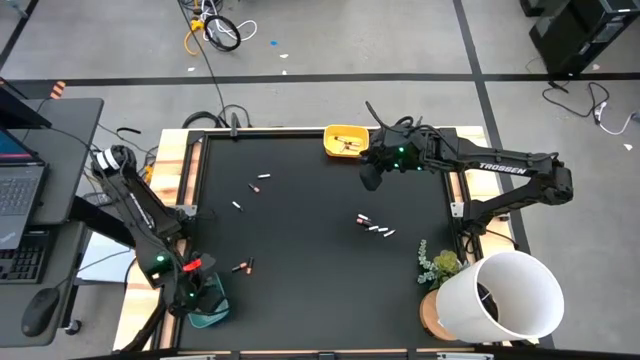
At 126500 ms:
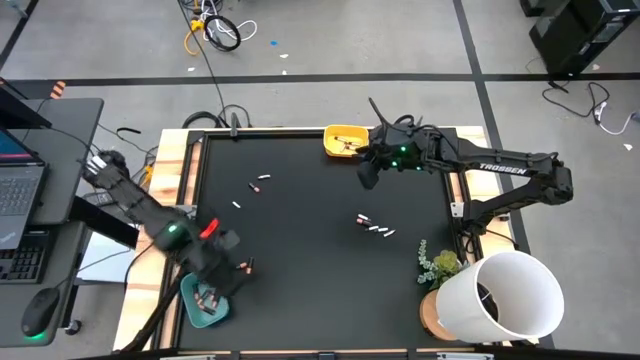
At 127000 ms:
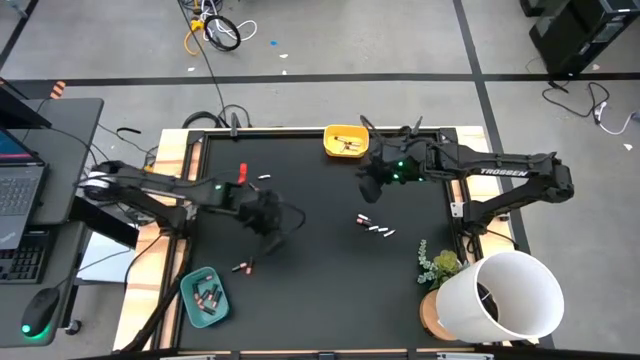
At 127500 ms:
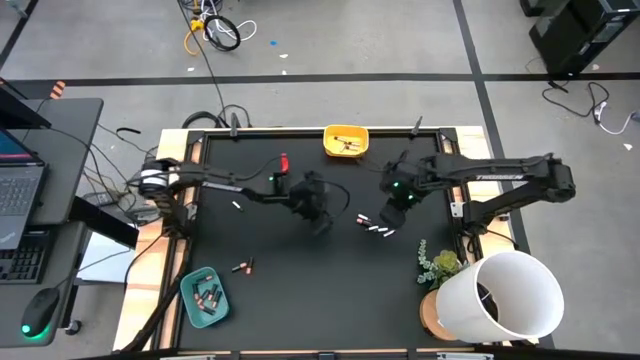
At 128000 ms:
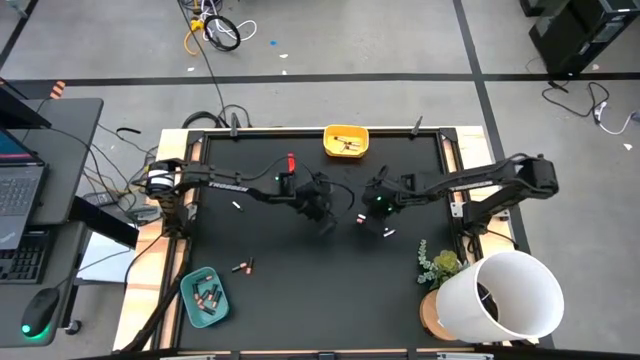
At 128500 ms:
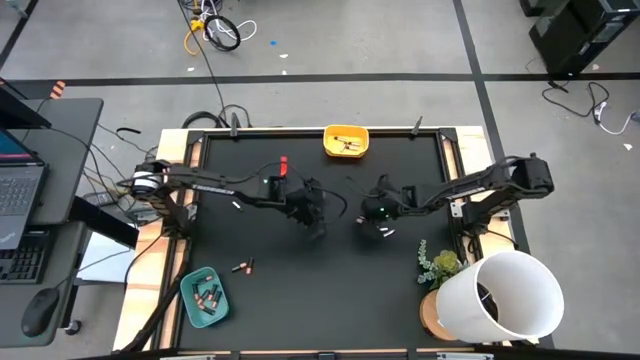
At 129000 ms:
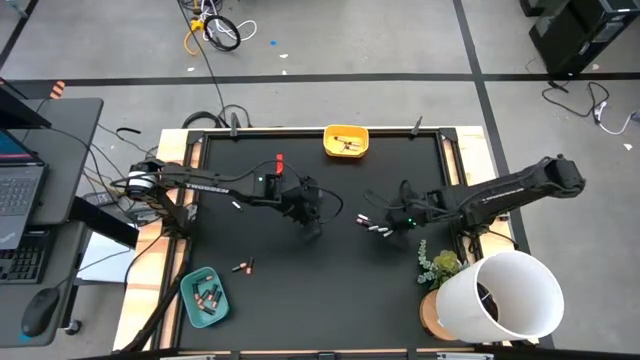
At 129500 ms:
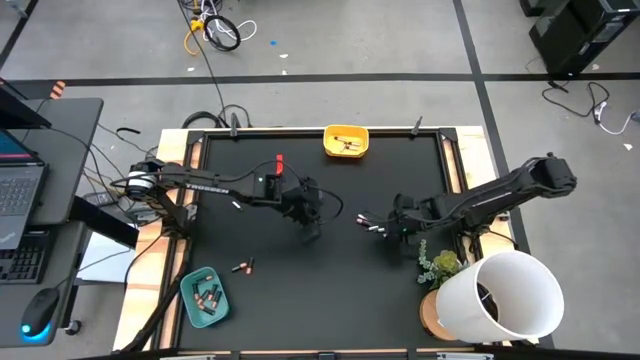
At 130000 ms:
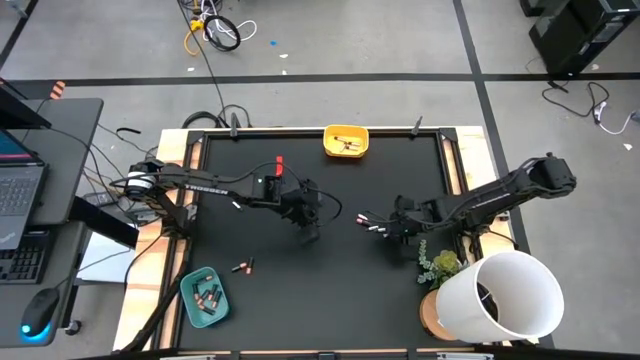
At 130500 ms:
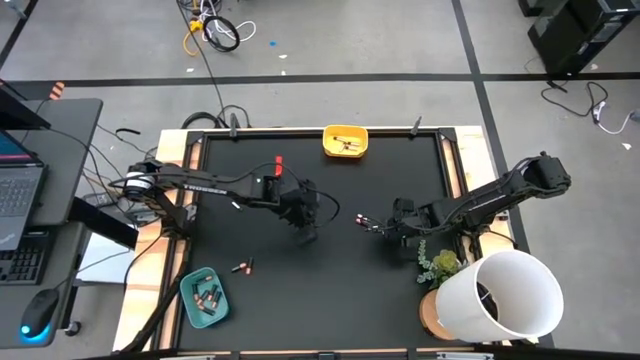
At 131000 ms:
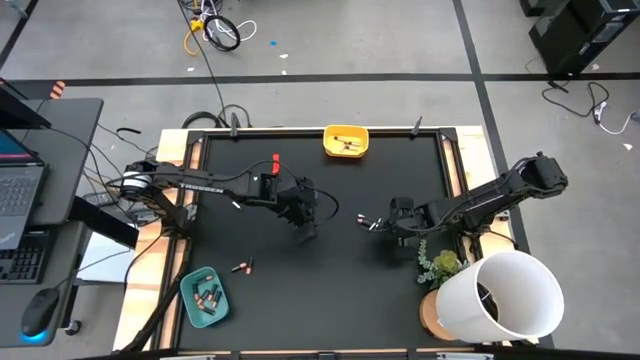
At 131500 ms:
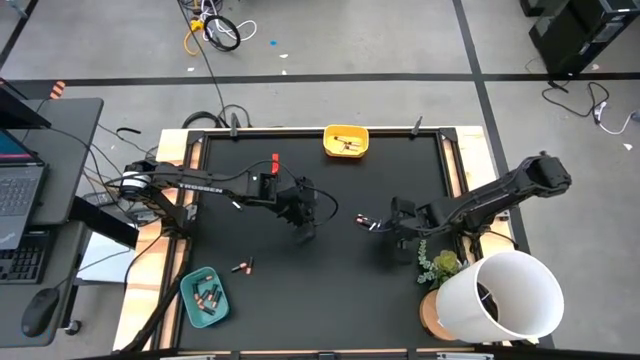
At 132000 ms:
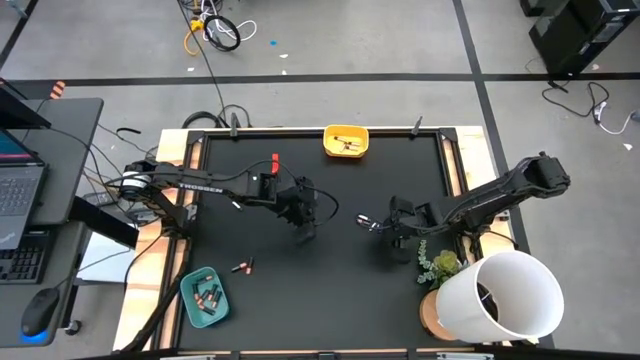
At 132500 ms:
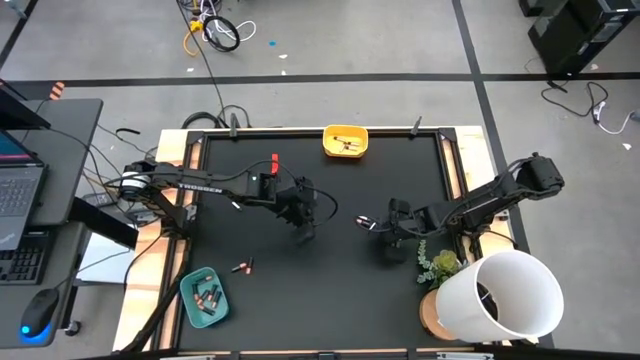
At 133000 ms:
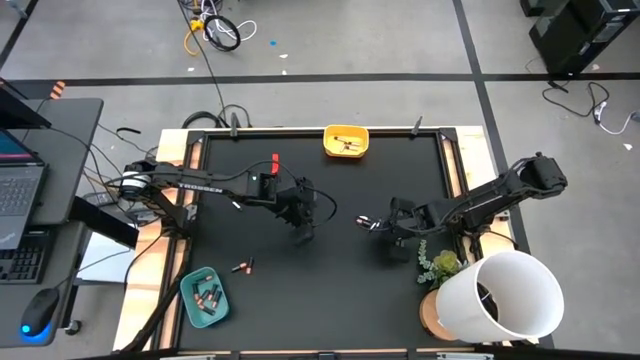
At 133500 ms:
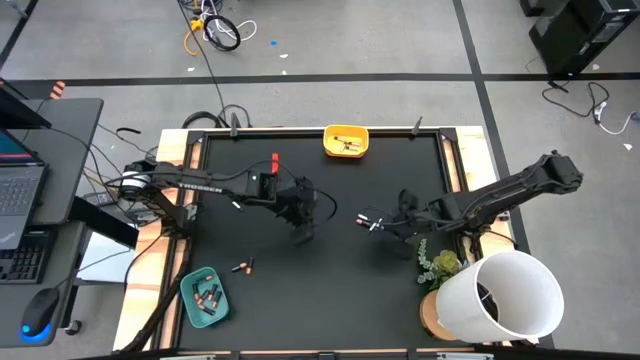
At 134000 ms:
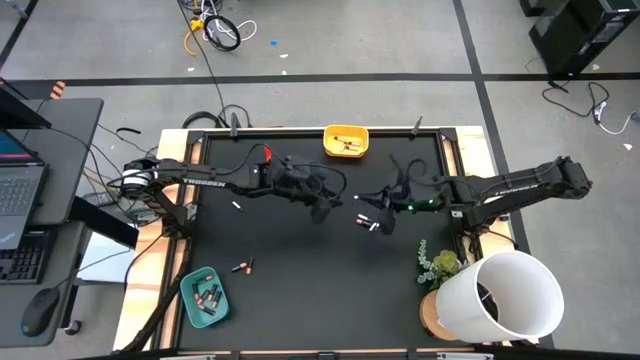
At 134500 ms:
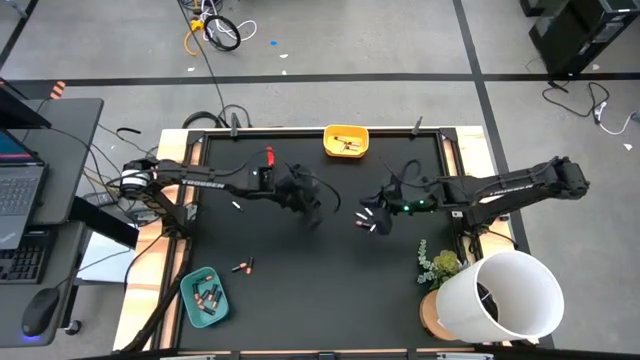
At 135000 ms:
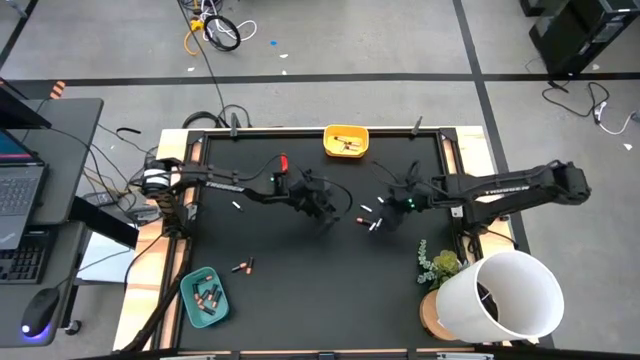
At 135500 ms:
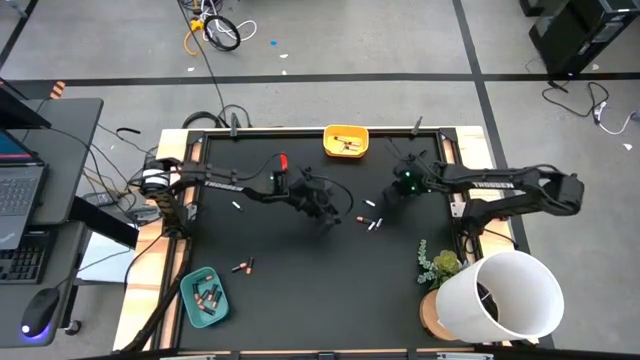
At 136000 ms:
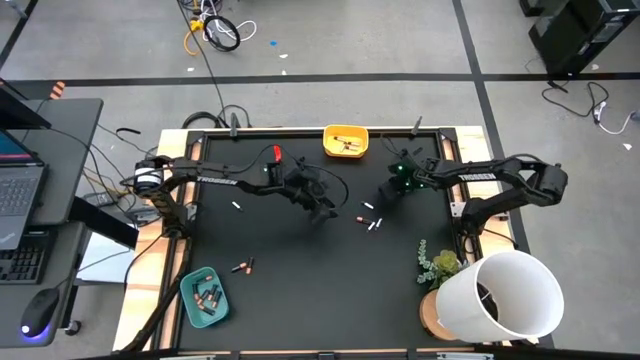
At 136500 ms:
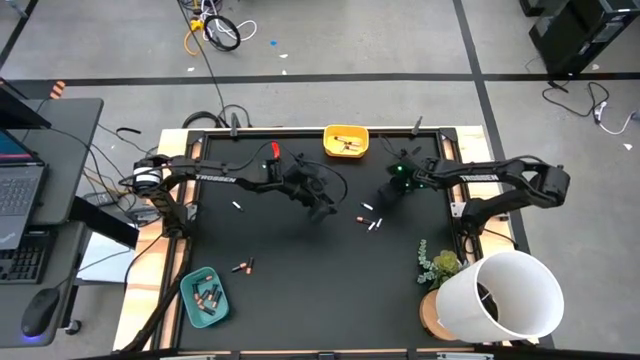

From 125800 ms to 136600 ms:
Task: Sort batteries
Put the silver battery into the yellow bin

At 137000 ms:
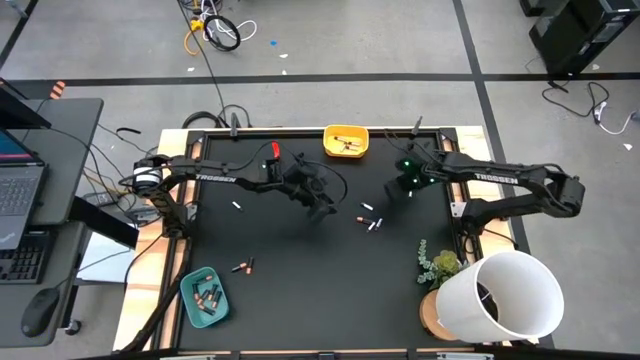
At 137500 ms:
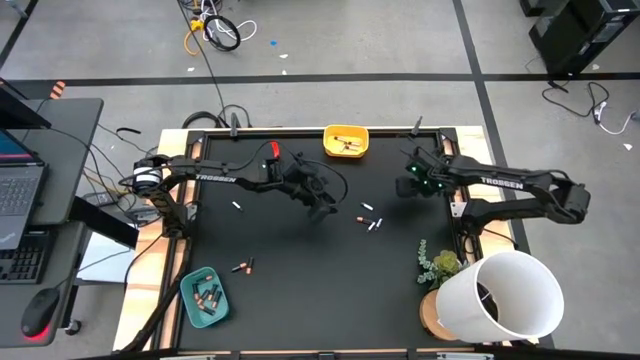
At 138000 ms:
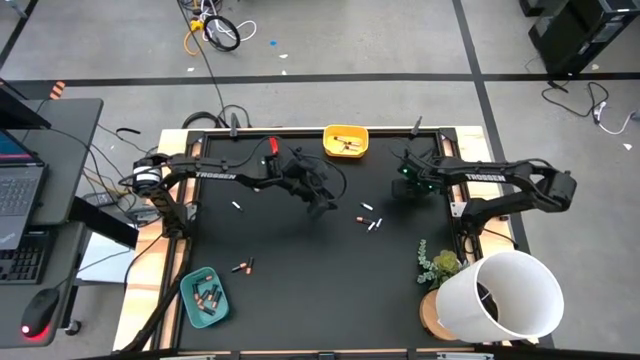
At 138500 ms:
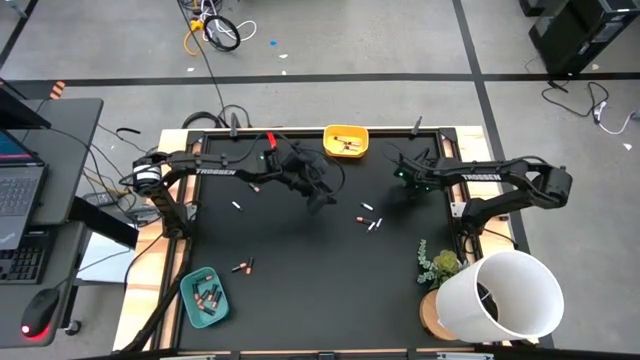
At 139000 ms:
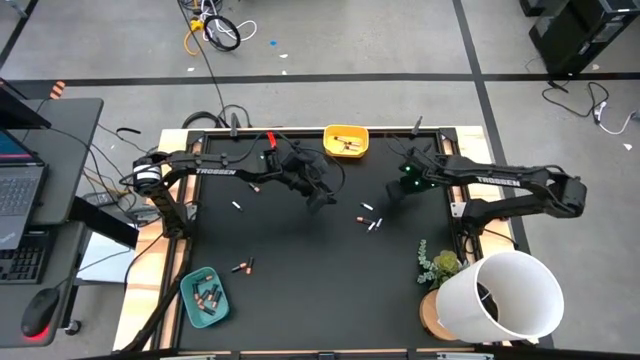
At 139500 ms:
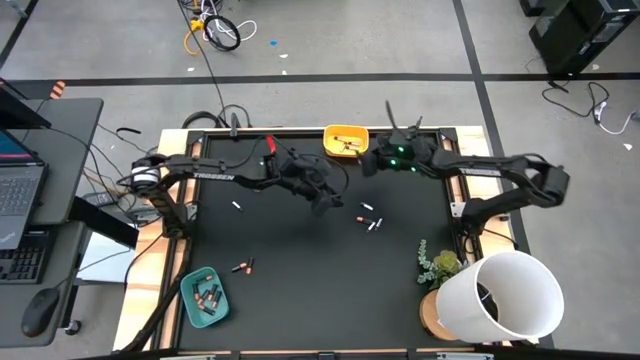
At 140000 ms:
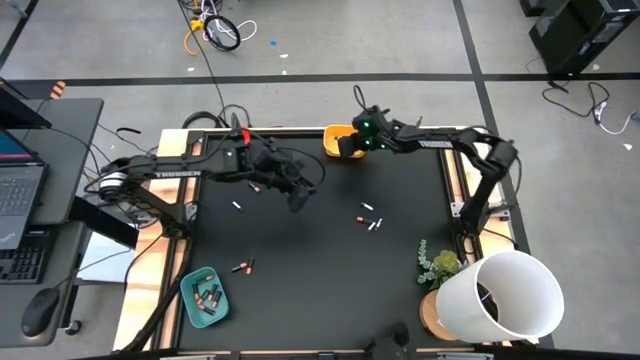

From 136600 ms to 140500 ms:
Put the silver battery into the yellow bin

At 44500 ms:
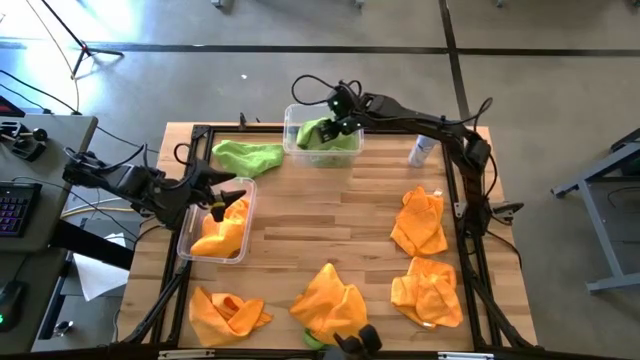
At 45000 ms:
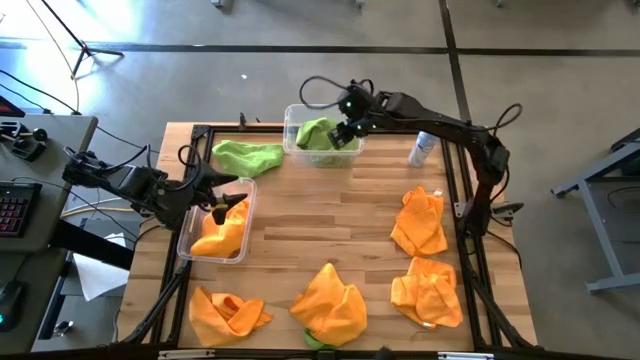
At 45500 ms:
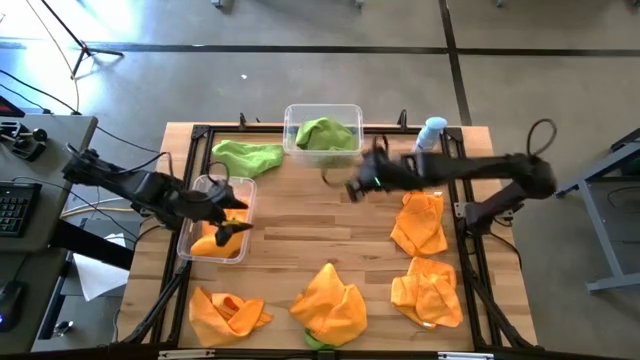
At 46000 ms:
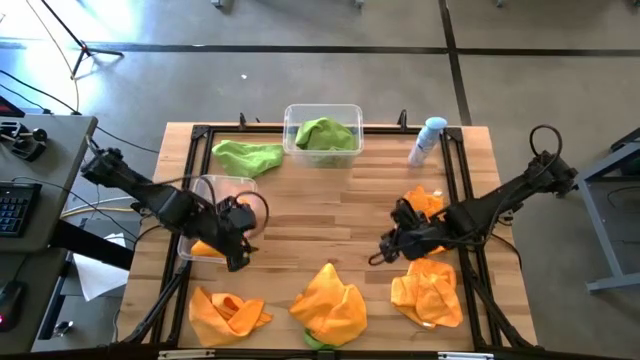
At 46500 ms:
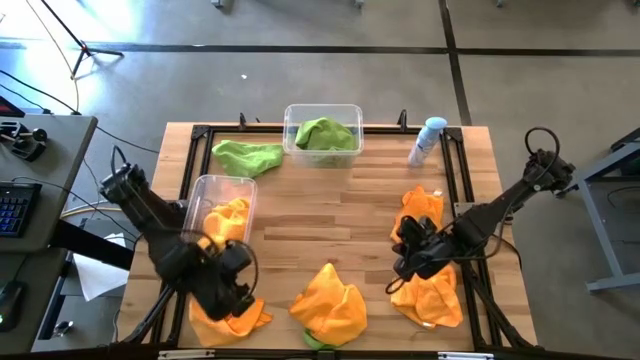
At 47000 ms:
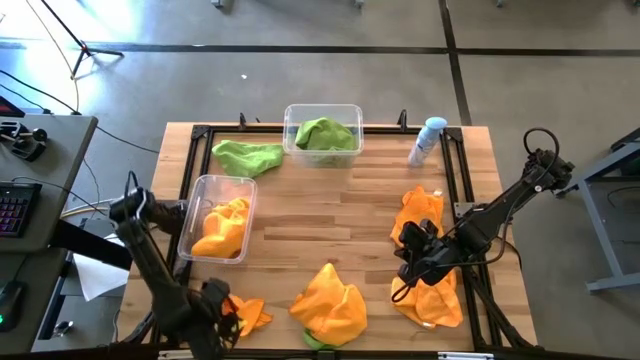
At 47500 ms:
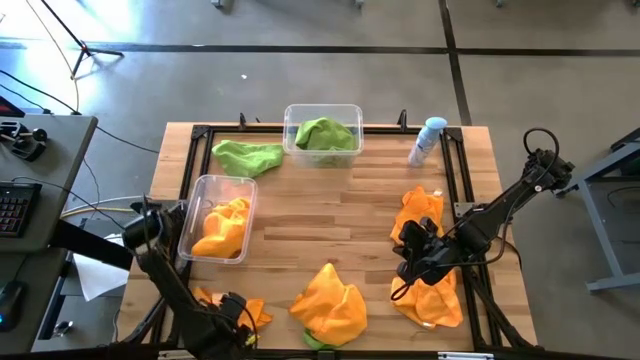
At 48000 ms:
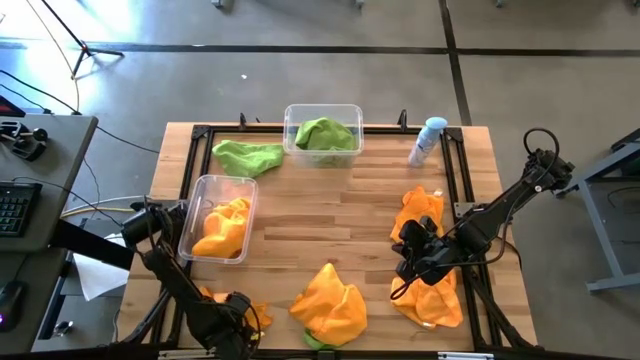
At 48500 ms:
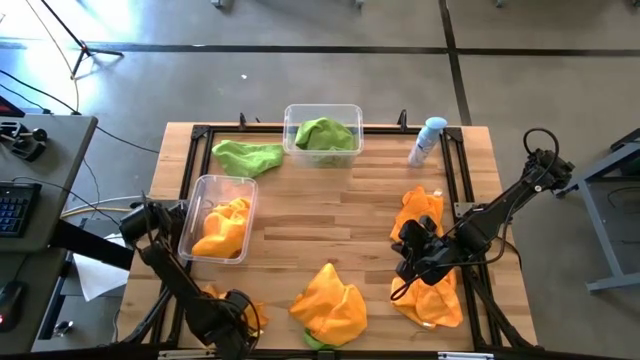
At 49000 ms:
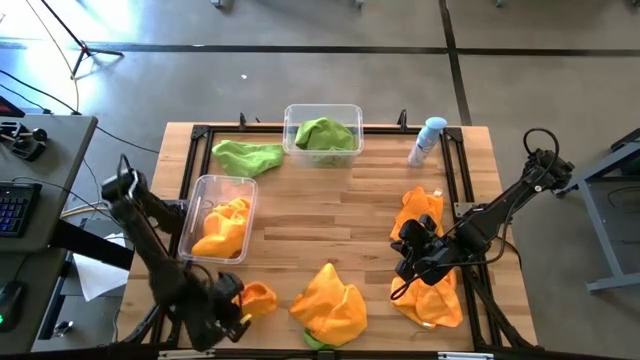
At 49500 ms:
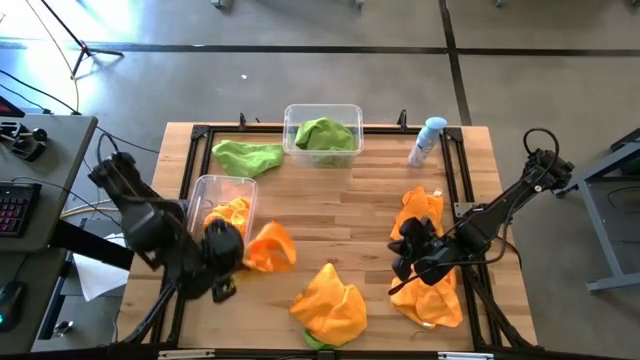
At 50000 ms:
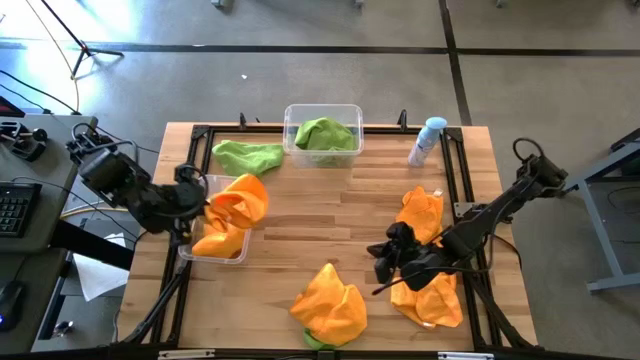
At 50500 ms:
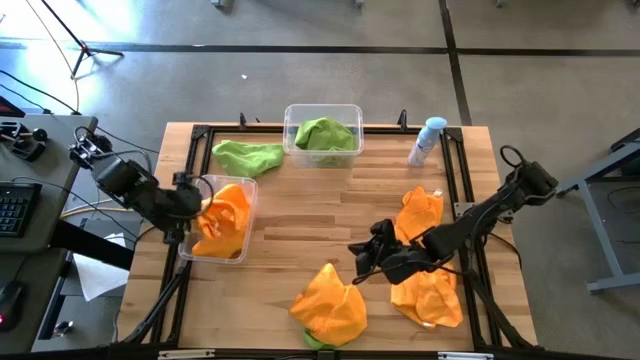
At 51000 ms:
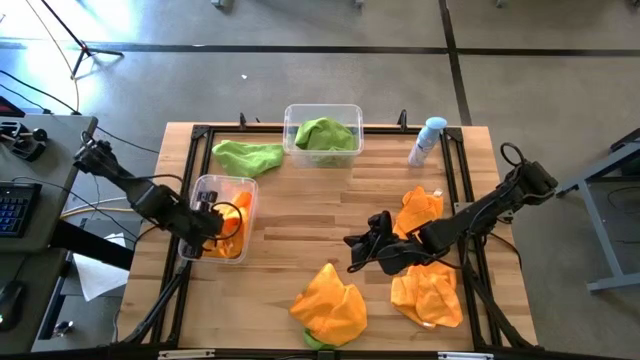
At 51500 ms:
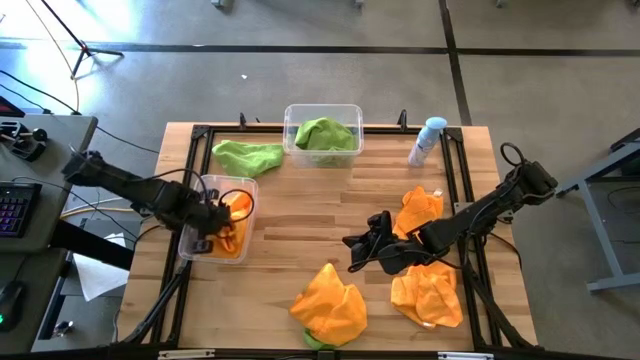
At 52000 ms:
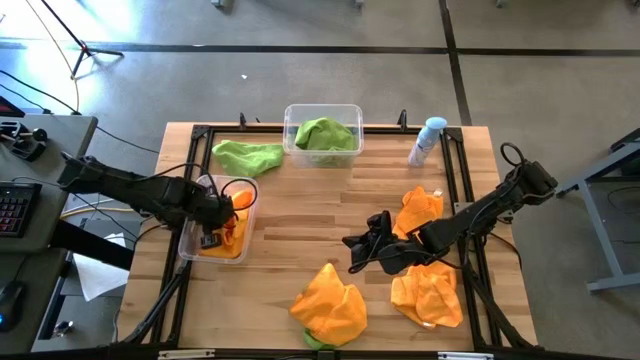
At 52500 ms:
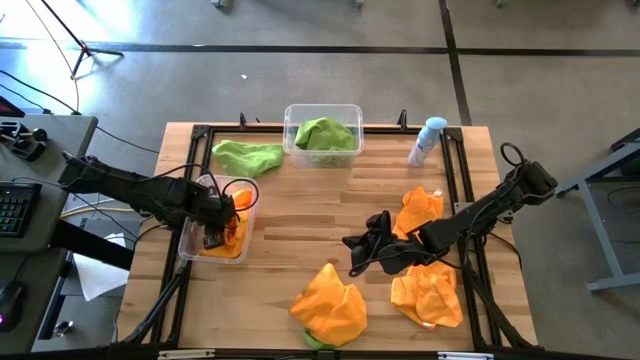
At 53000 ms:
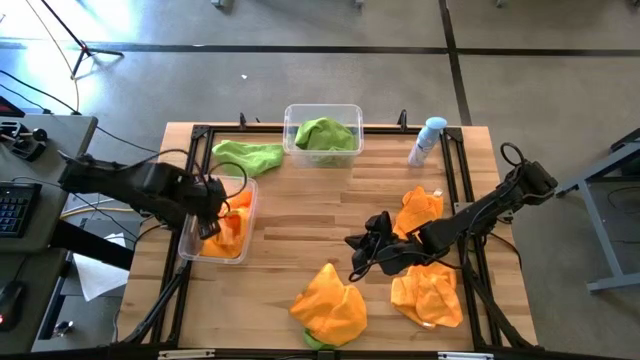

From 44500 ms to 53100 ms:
Task: Sort microfiber towel by color & place in baskets
Put the orange microfiber towel into the bottom transparent bin
